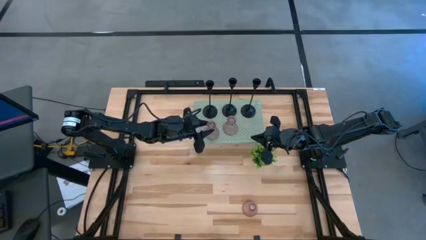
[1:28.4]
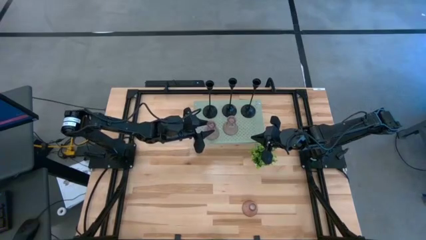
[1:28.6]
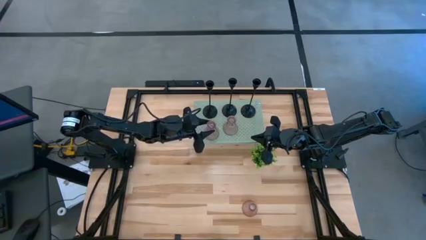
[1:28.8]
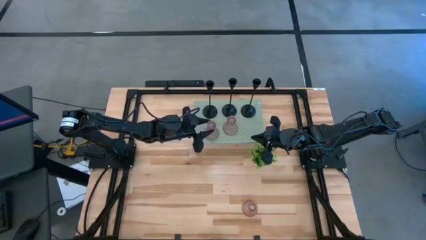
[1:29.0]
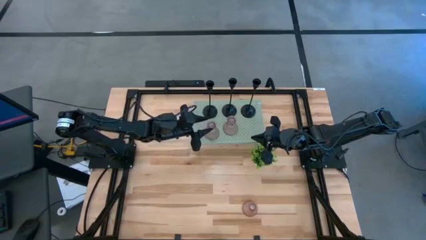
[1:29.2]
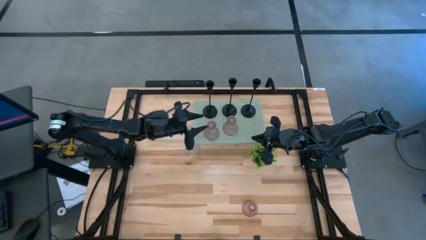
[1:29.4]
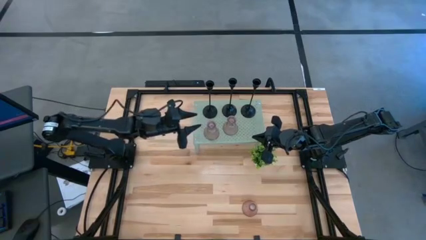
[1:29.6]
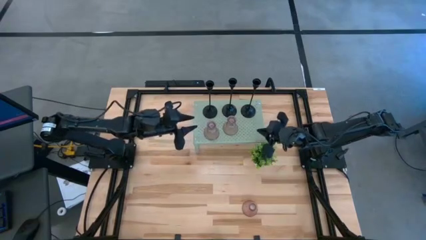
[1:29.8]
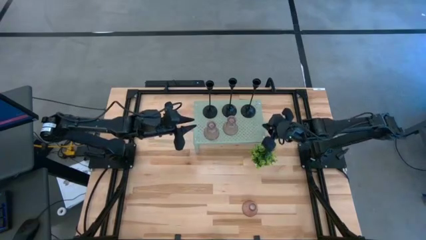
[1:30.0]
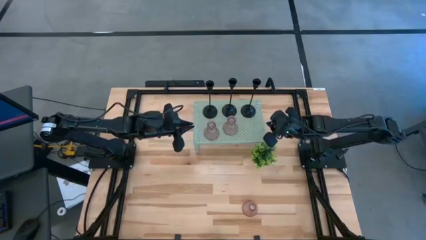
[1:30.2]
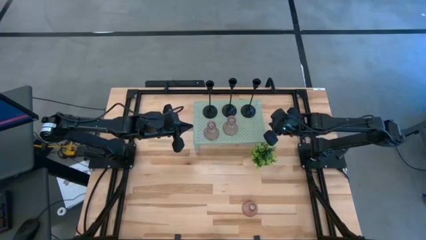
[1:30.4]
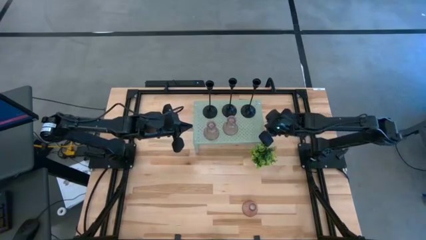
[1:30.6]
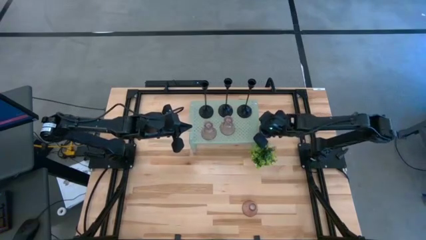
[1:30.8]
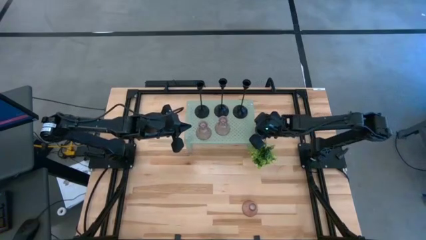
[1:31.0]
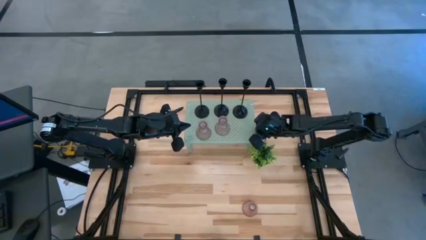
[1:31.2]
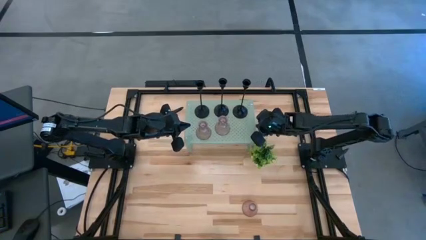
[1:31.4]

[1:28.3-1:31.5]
Task: Pick & Place candle stick holders
Adjust the shelf on the table

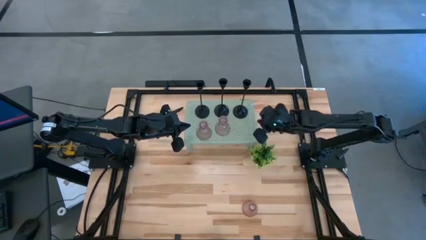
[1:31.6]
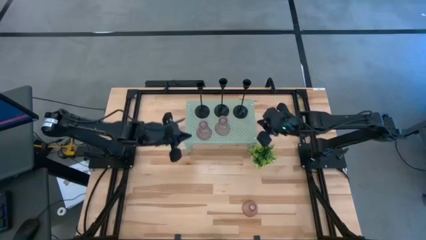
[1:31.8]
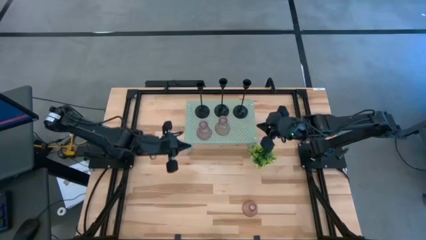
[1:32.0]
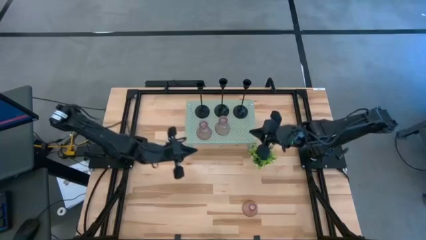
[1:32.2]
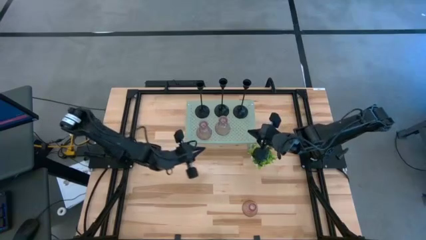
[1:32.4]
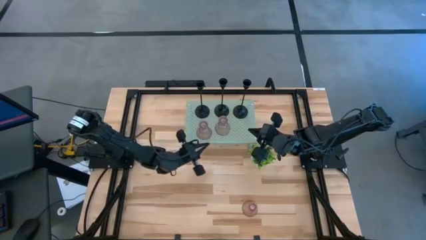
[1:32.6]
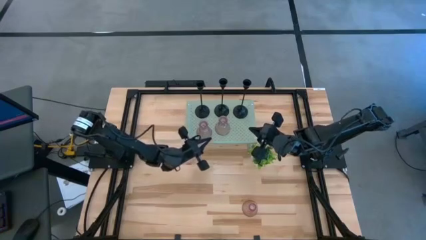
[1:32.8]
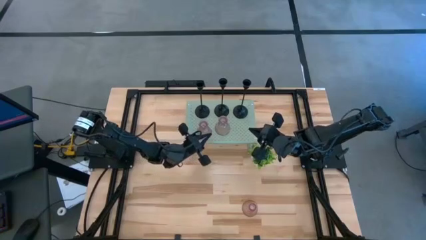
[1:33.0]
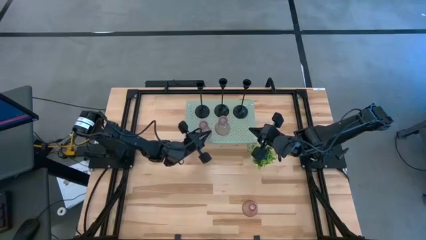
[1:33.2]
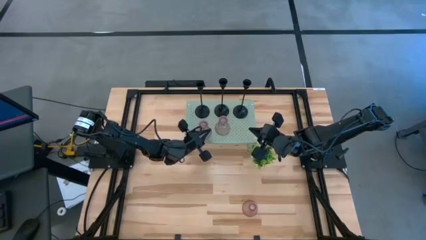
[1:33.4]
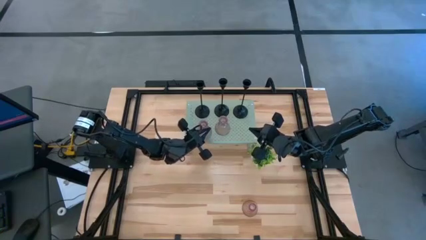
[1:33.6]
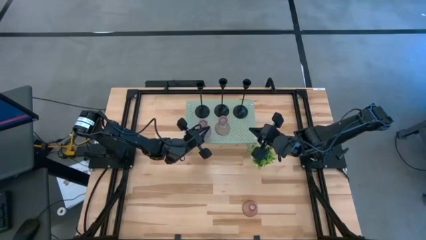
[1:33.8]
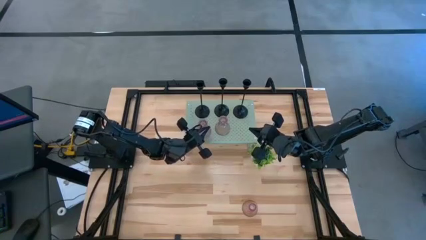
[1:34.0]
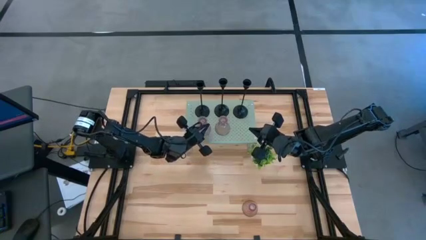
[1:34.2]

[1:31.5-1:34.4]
Adjust the left pink candle holder on the shelf

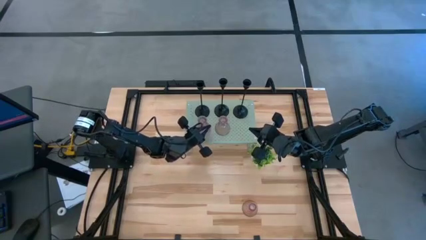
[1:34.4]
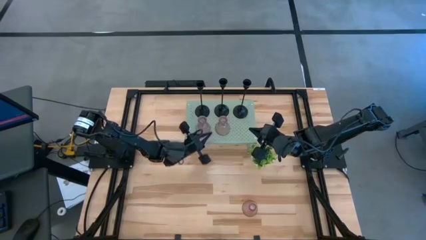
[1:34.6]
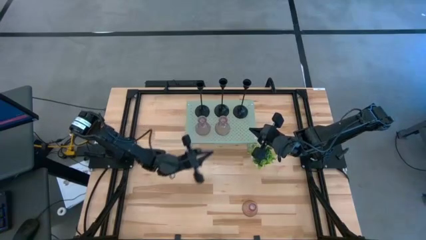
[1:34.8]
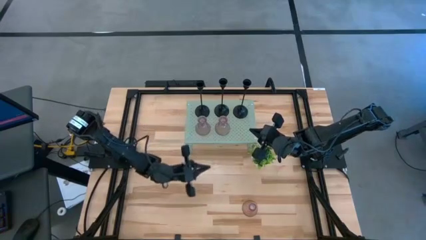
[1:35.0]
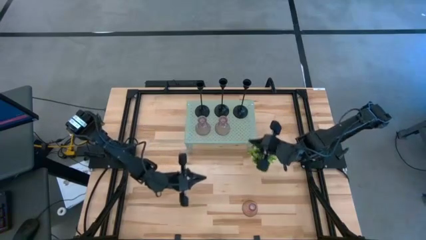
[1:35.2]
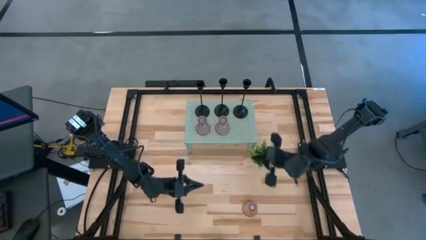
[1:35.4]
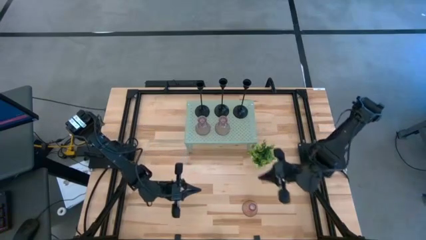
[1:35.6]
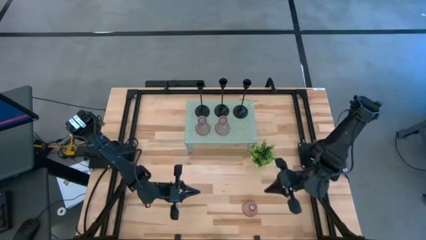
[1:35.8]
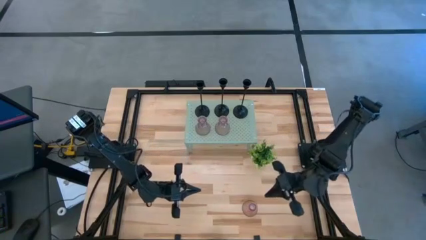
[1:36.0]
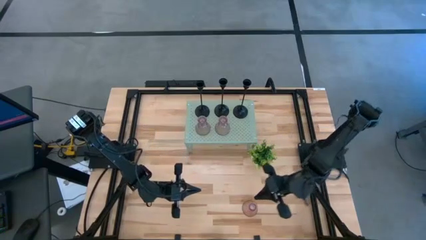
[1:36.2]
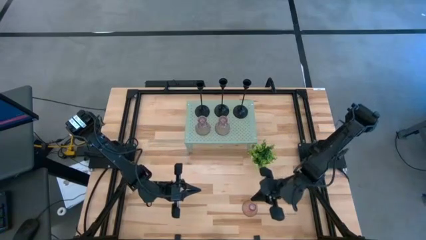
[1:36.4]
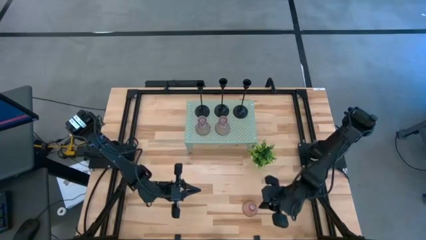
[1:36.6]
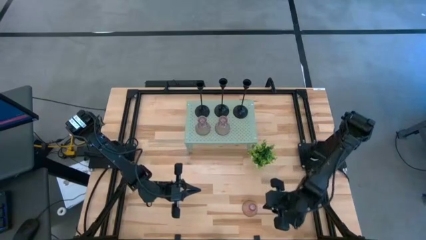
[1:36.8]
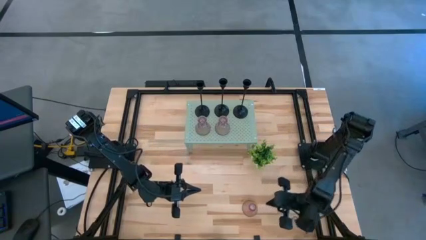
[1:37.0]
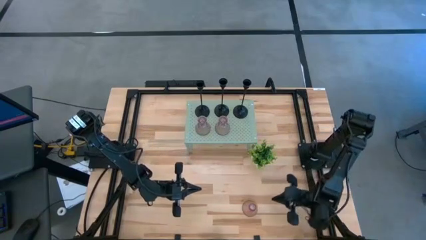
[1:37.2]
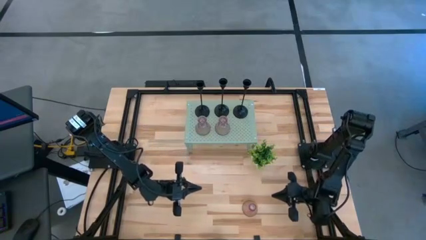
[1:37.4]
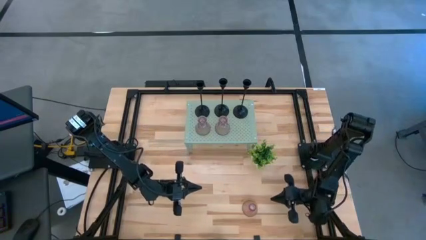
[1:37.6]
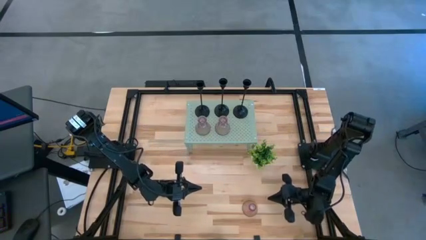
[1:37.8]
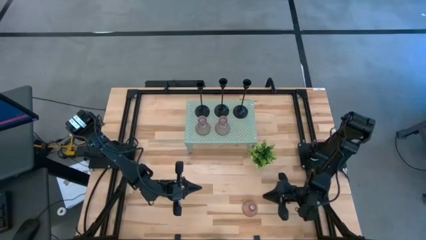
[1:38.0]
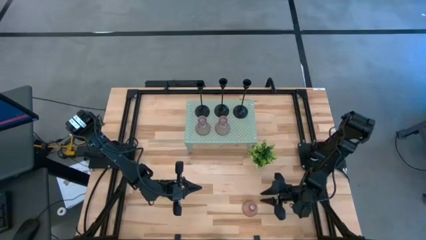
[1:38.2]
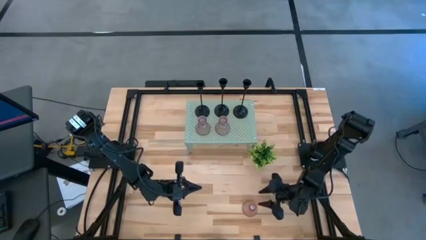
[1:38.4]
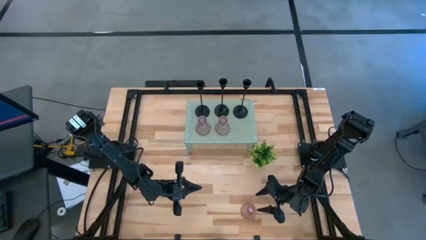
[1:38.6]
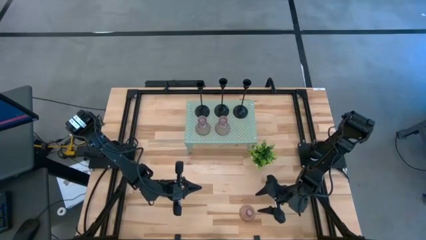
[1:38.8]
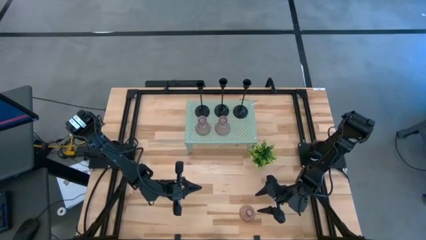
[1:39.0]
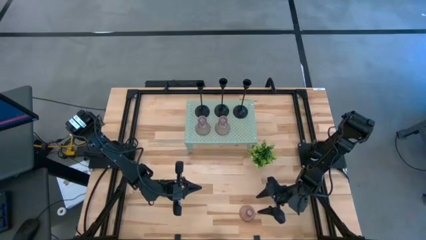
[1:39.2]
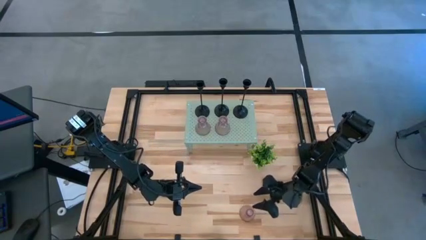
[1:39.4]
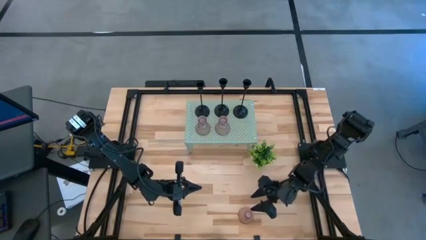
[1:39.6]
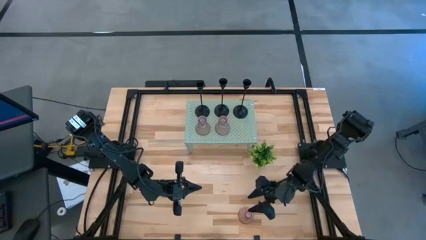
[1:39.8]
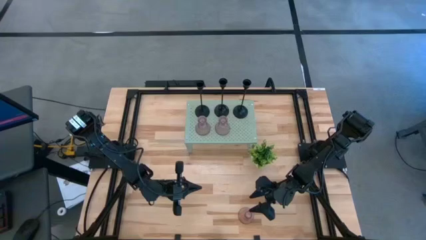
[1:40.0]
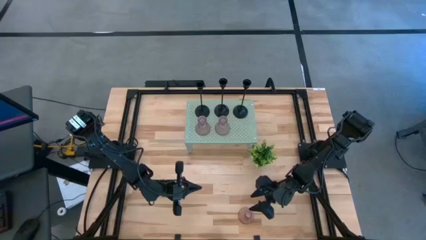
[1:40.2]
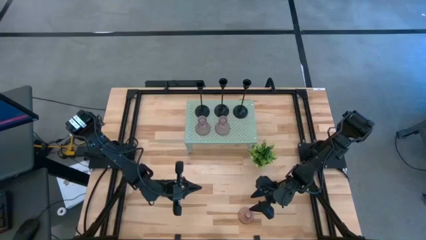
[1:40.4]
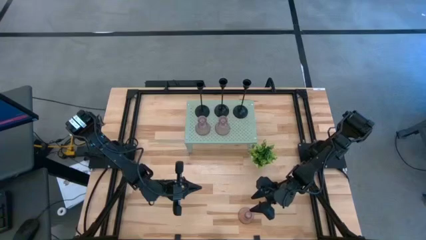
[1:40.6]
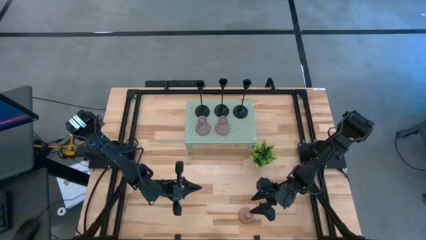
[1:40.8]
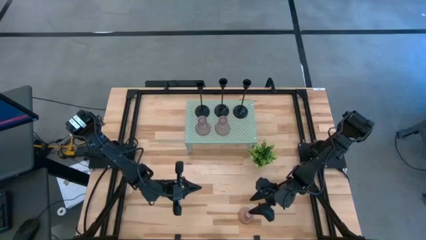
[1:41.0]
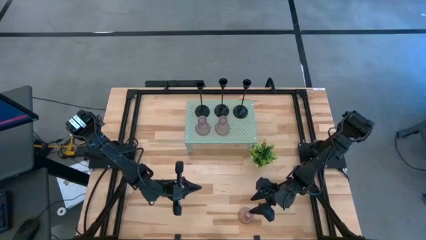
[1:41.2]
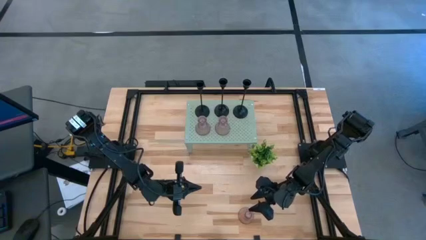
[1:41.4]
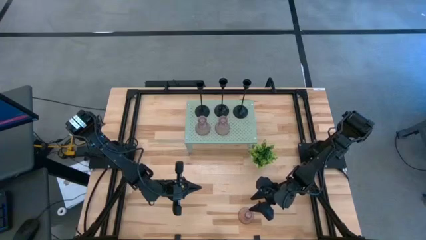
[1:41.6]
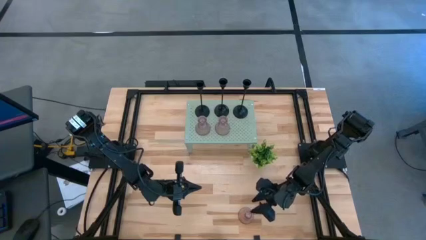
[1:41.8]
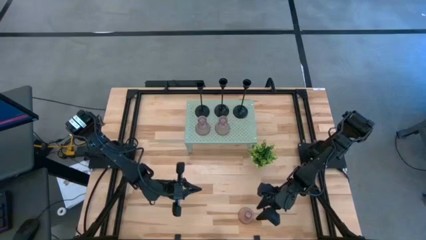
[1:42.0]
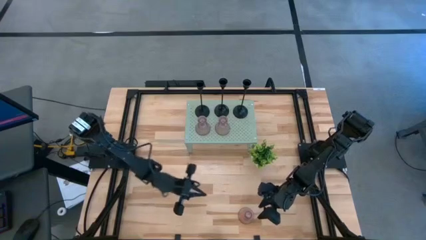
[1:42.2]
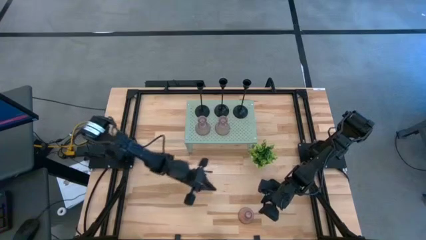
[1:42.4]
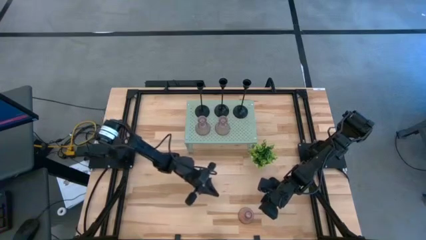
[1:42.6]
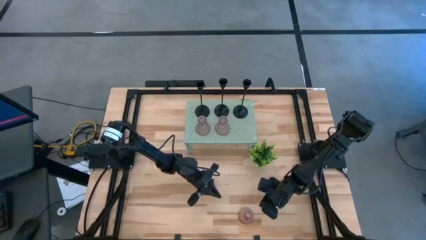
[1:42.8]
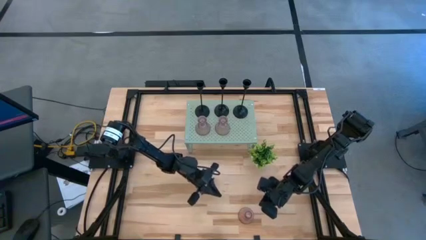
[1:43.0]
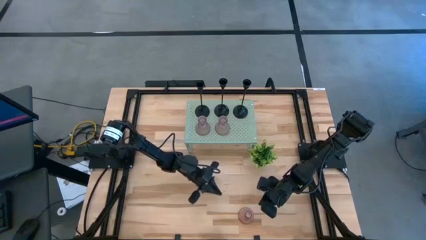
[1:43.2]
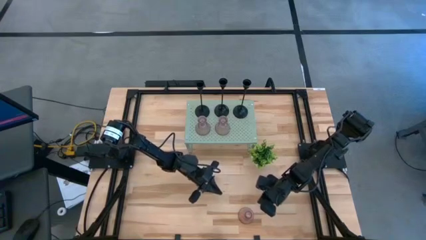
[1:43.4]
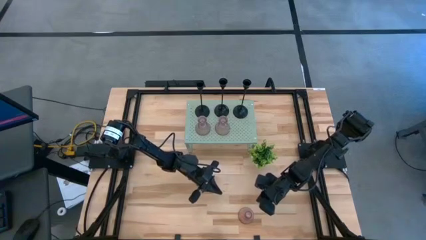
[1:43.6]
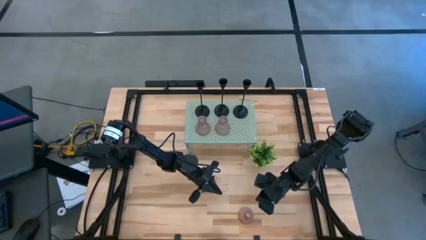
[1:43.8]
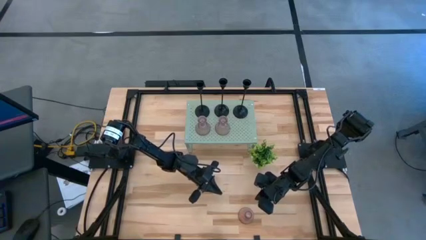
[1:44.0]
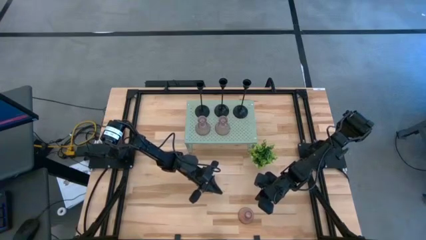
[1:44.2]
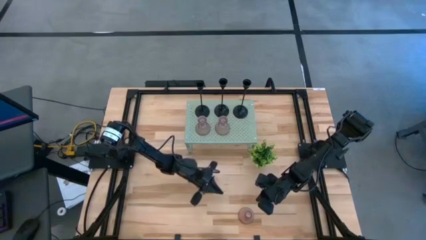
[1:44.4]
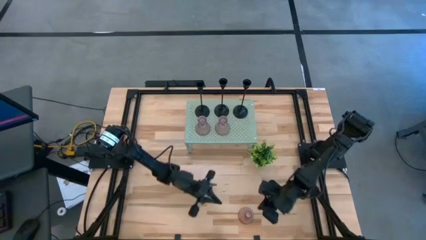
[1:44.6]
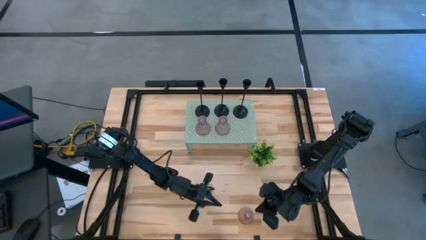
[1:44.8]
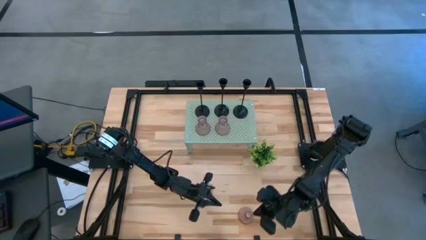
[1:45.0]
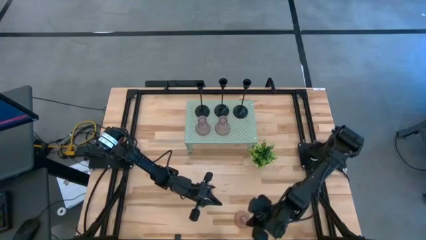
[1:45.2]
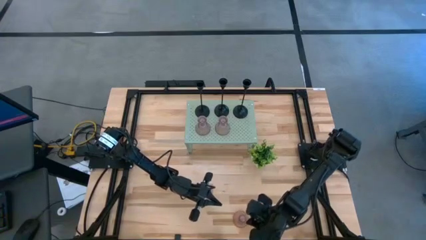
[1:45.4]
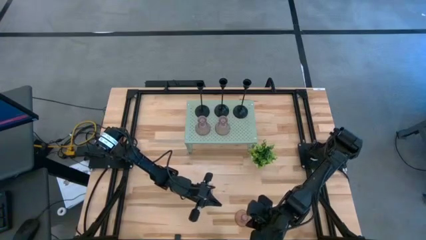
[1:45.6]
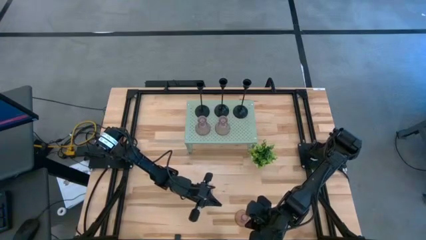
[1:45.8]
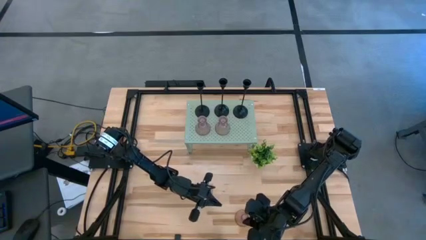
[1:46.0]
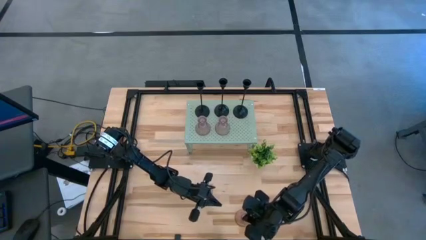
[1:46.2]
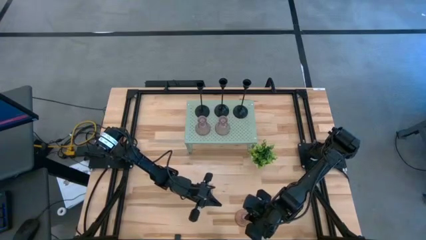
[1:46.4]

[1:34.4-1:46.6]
Align the pink candle holder on the shelf with the pink candle holders
